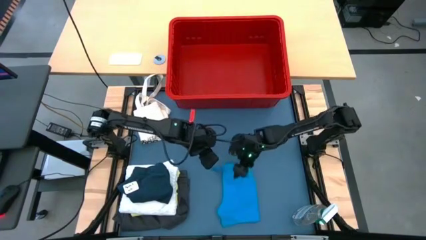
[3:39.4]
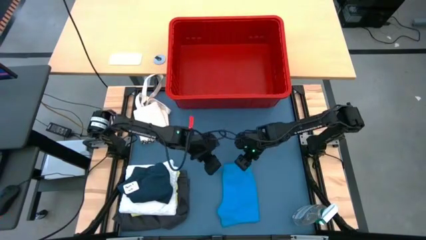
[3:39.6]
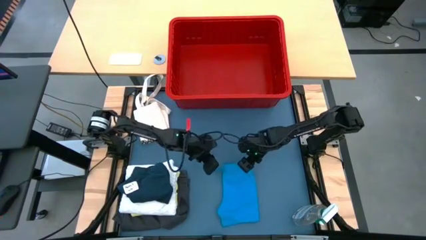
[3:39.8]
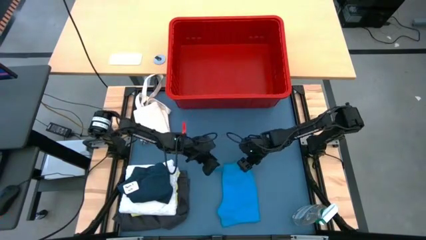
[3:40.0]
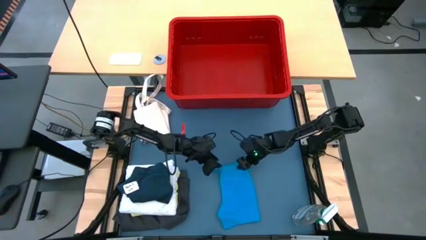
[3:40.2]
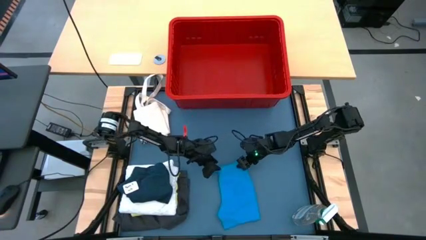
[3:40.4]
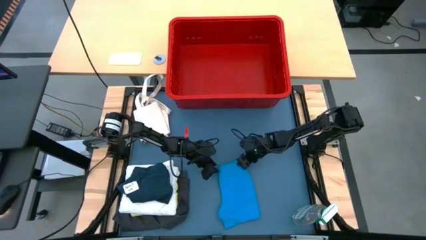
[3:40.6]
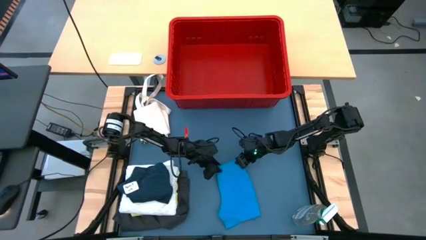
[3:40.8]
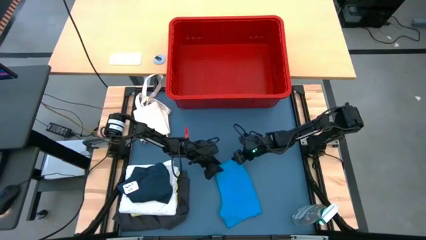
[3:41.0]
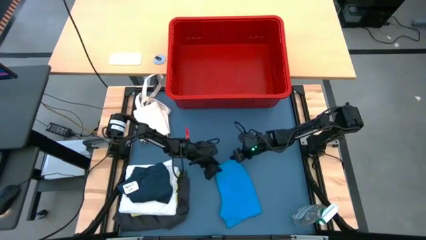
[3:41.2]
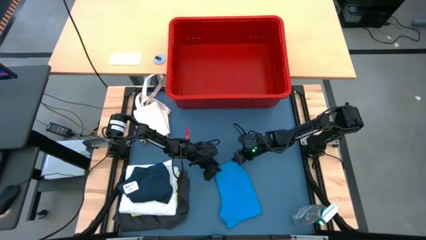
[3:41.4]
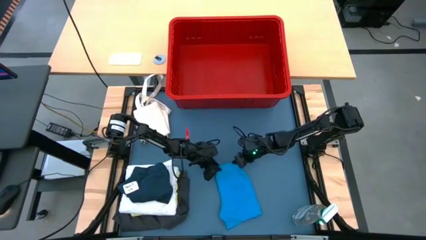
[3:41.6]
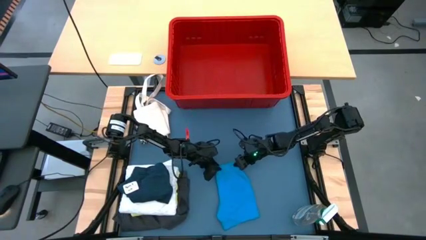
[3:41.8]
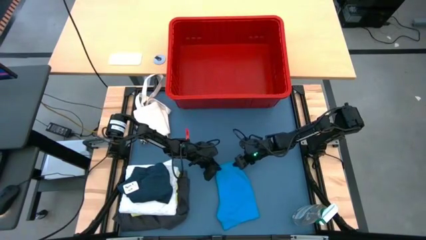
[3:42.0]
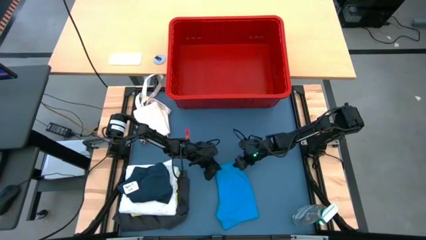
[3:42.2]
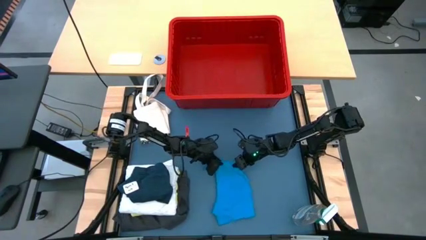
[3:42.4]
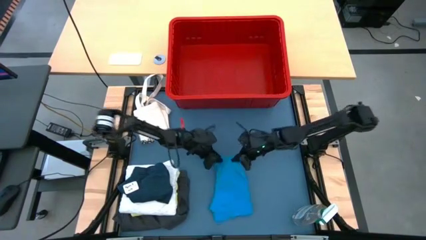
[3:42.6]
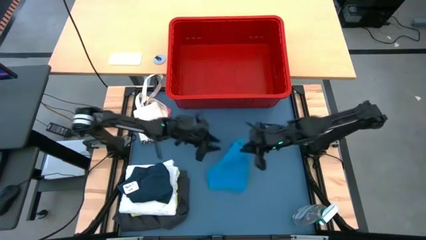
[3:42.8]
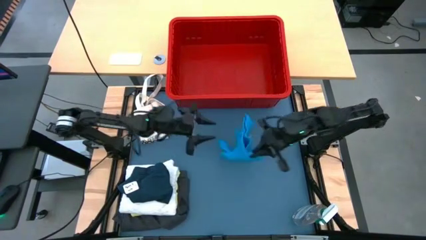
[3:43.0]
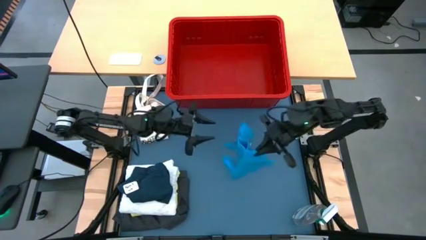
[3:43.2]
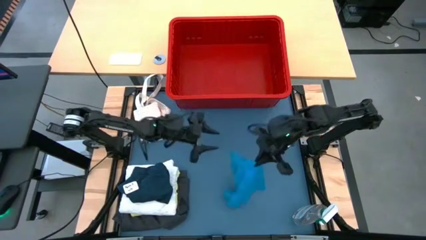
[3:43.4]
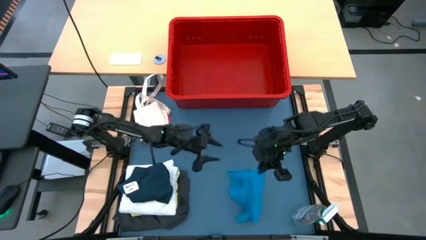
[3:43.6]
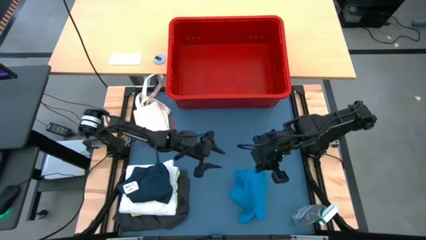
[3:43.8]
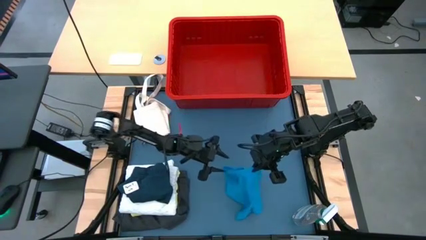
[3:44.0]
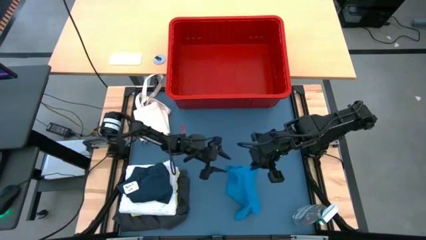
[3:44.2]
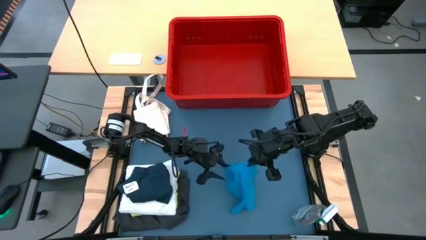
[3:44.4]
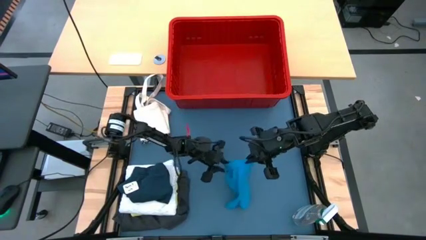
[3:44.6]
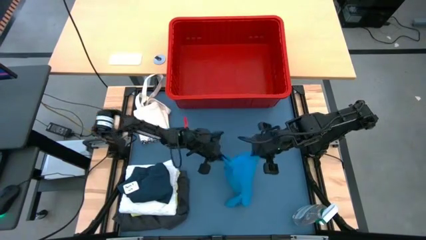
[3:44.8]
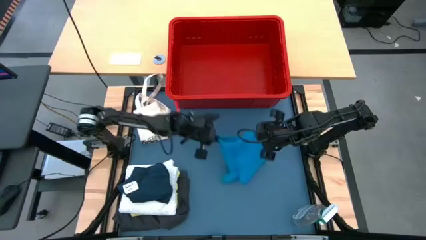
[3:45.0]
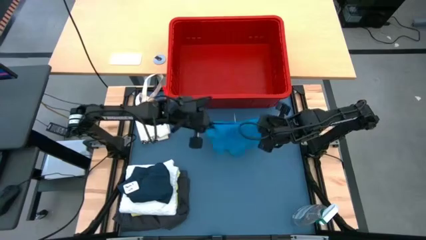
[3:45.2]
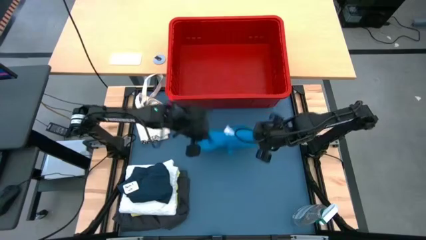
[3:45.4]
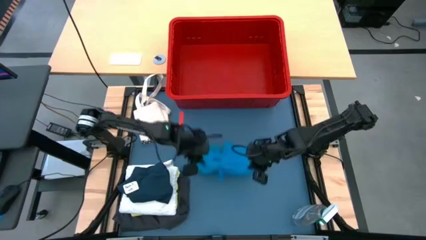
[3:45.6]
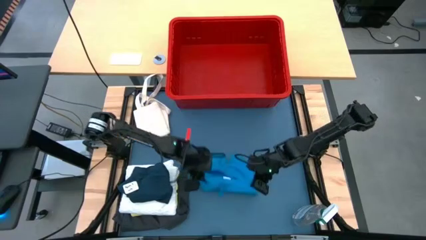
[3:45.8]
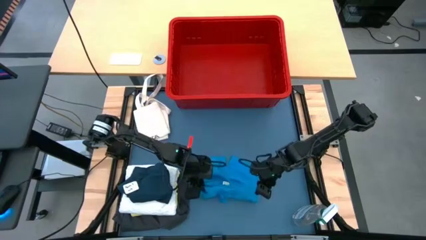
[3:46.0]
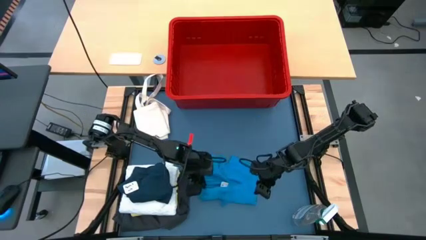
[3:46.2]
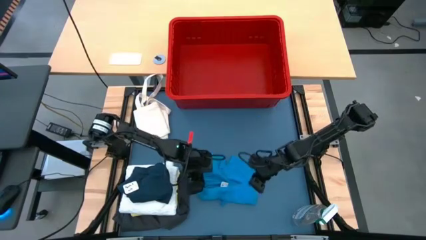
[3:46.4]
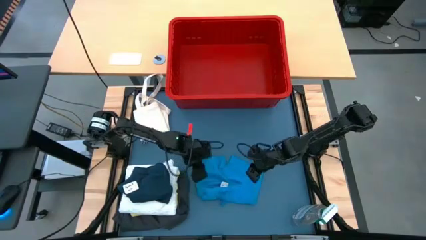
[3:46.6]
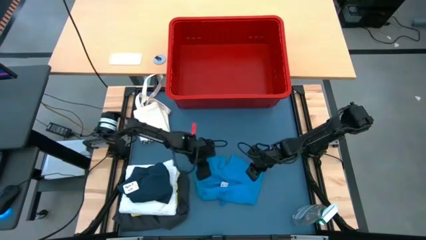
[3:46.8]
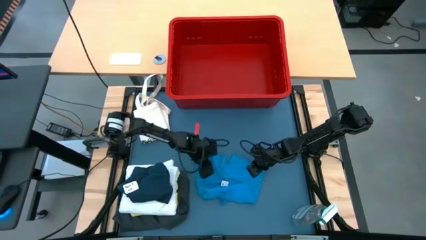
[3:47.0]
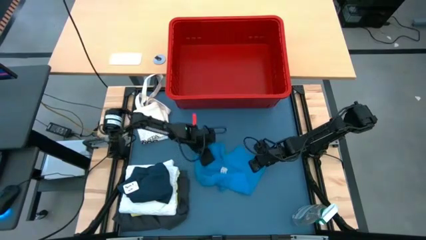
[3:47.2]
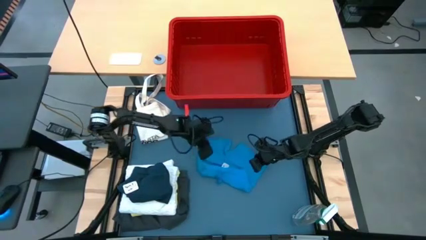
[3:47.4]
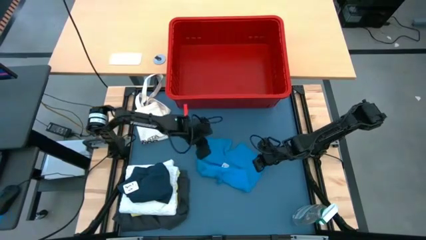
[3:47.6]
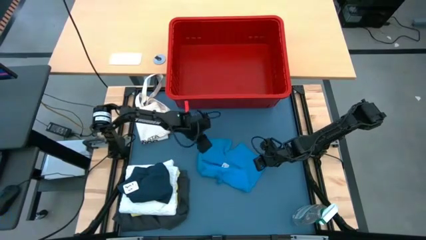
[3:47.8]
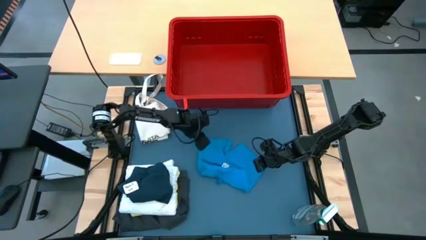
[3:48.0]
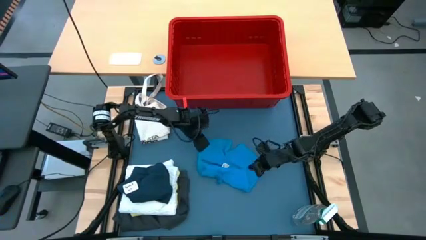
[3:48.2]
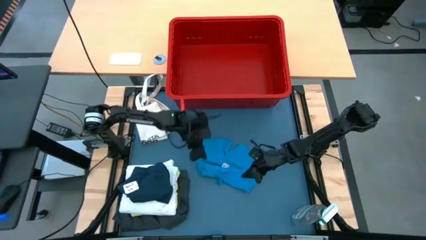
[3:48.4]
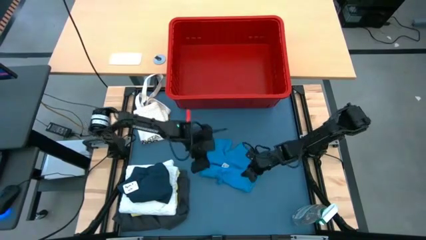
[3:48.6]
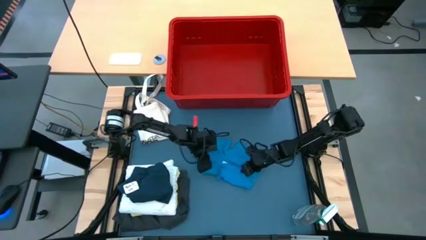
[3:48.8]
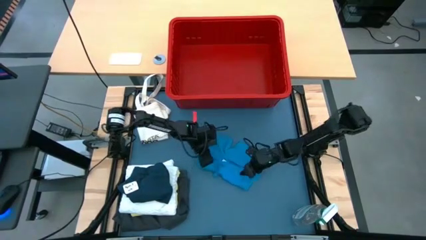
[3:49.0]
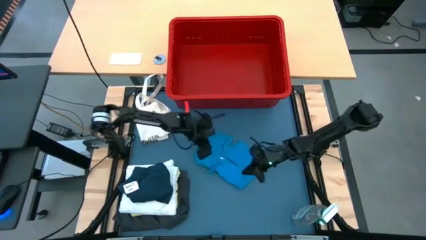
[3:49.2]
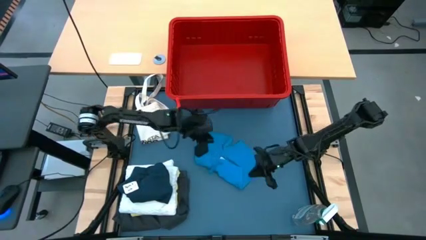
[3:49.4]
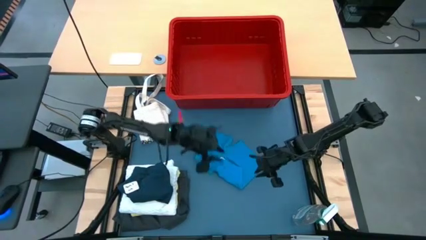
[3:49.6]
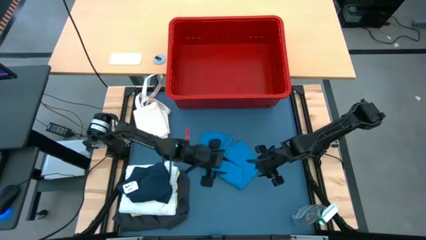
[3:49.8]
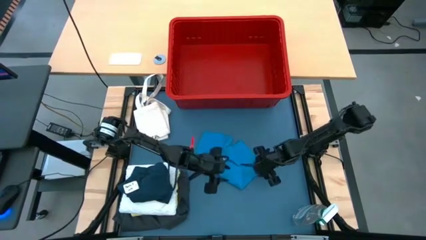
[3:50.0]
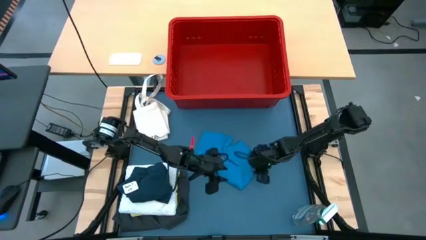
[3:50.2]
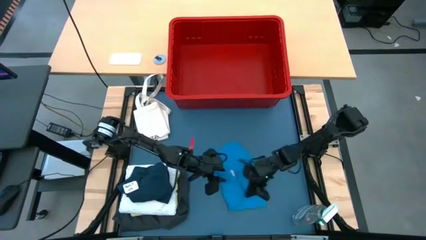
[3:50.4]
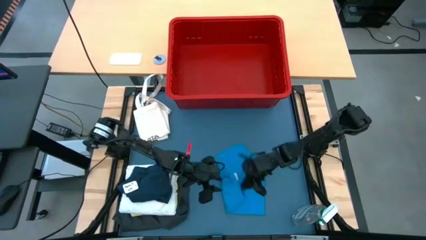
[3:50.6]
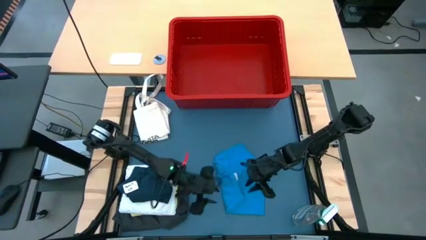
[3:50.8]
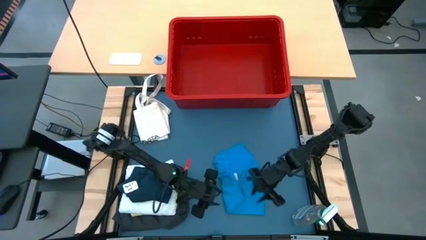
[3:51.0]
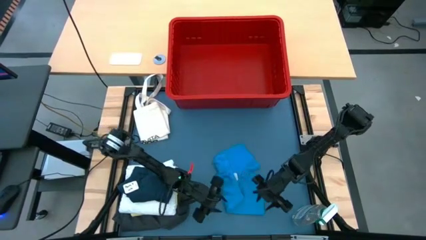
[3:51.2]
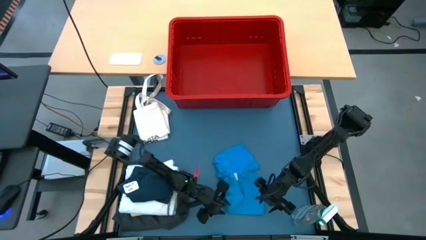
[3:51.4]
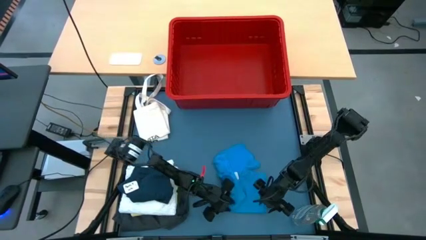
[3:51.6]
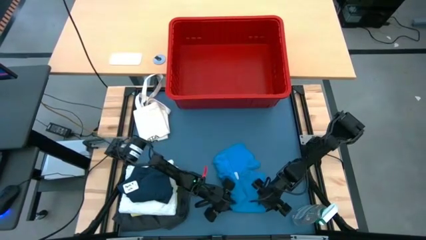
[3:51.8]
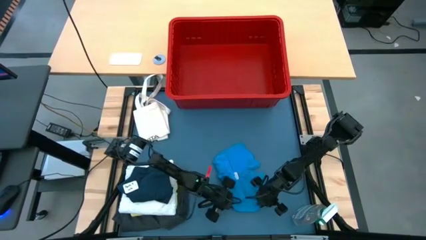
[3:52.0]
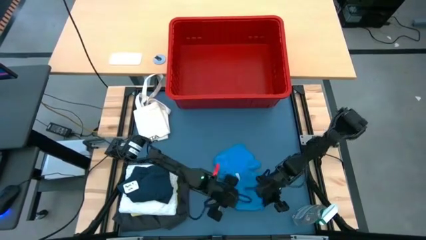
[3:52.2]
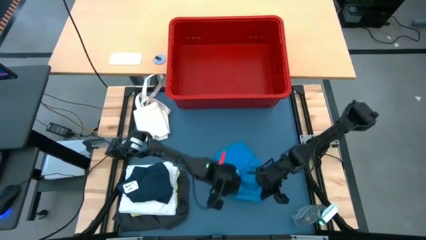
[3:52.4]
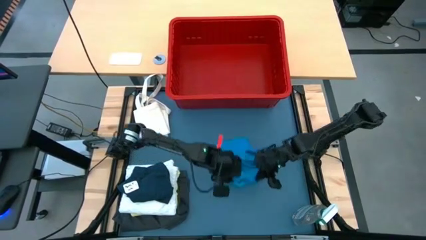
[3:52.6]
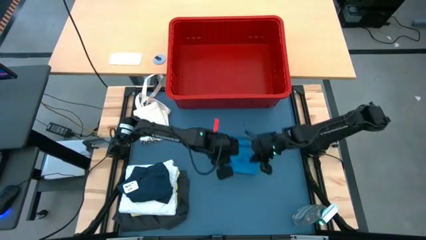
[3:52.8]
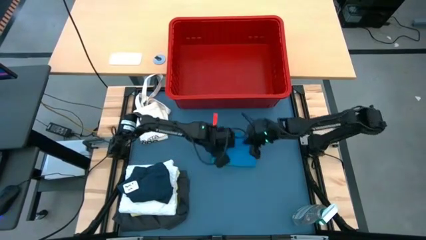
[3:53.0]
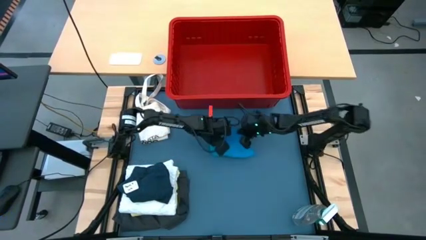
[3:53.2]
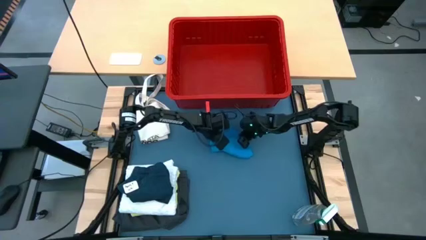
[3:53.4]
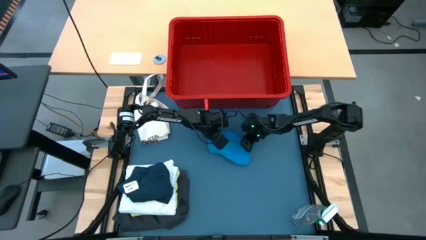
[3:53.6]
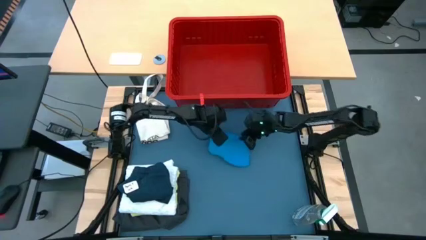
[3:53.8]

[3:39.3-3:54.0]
Task: Fold laundry
Fold the blue shorts

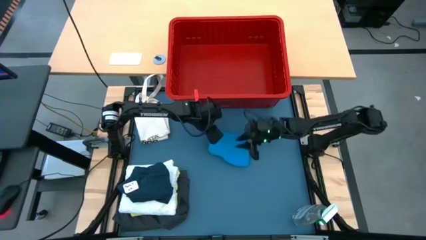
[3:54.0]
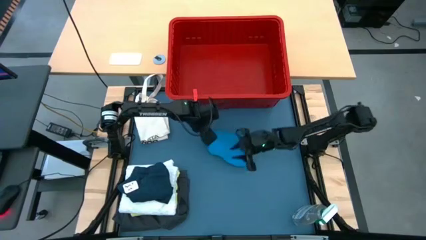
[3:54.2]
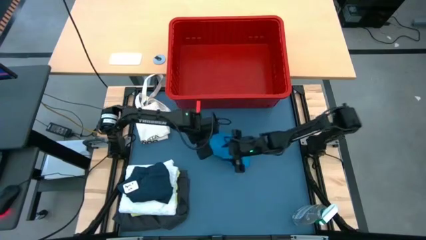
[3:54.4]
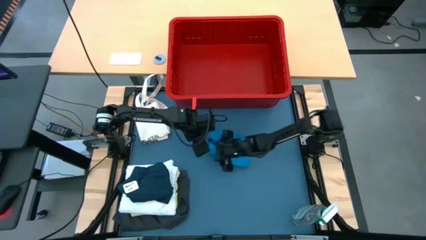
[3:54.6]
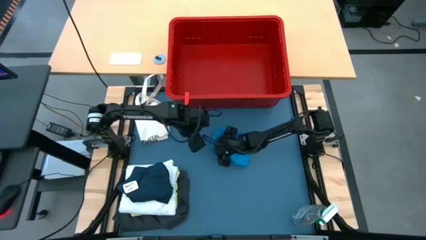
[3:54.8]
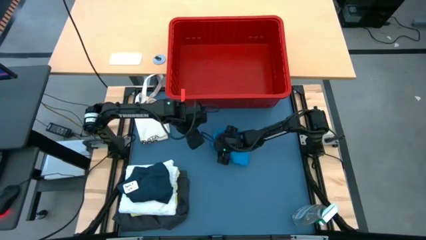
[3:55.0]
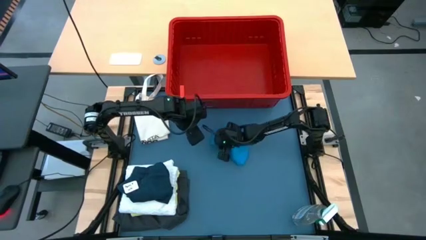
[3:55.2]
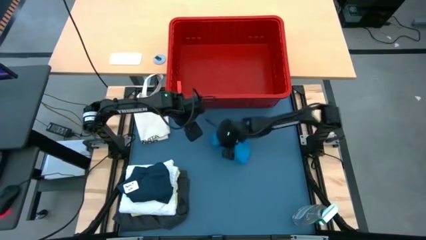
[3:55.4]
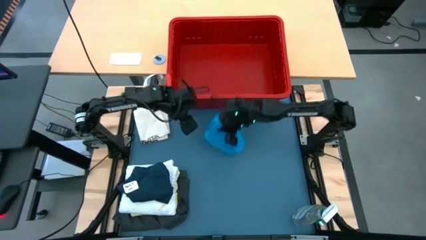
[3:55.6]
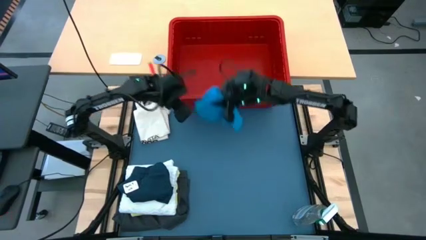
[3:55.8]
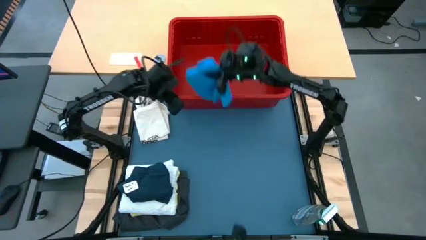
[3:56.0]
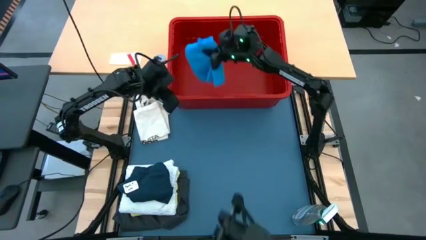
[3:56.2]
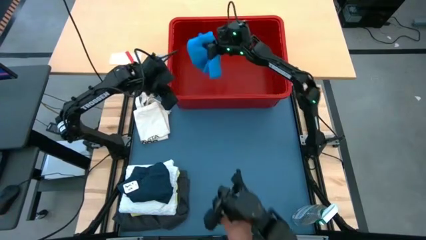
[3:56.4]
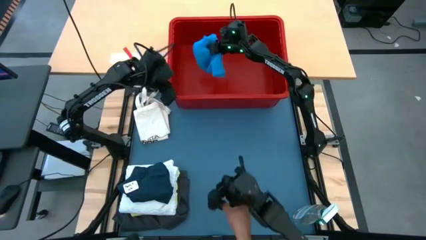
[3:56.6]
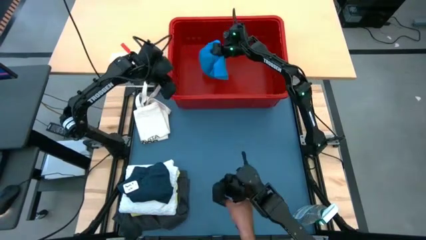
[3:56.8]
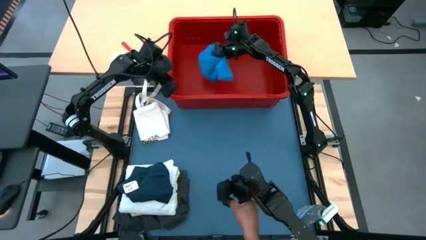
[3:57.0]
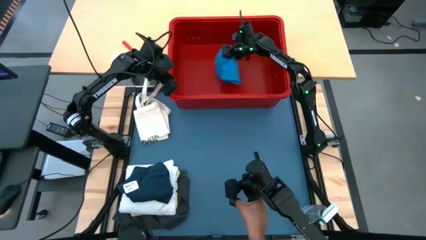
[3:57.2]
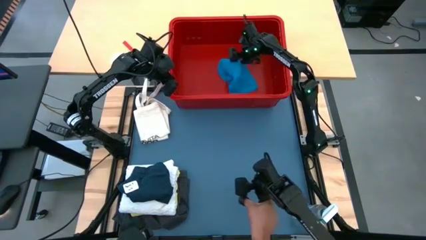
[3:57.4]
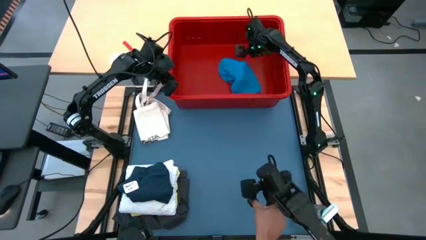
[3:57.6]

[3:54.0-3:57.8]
Put the folded blue shorts into the bin
